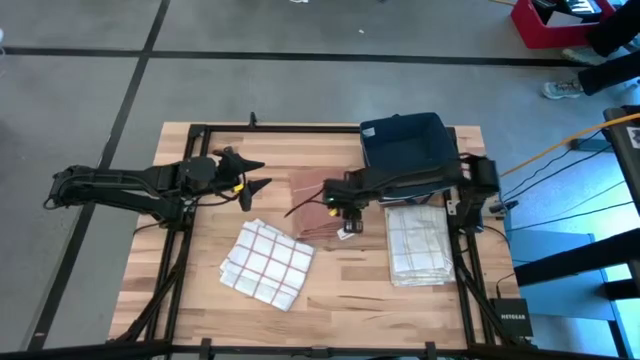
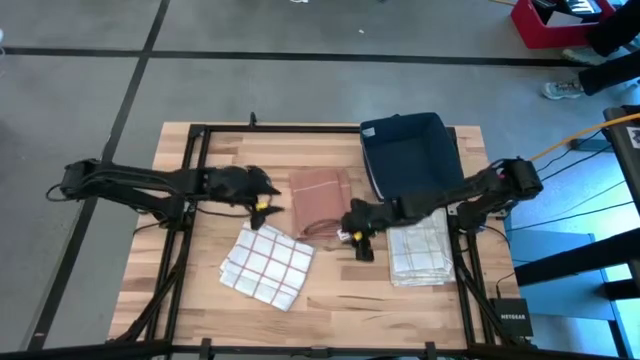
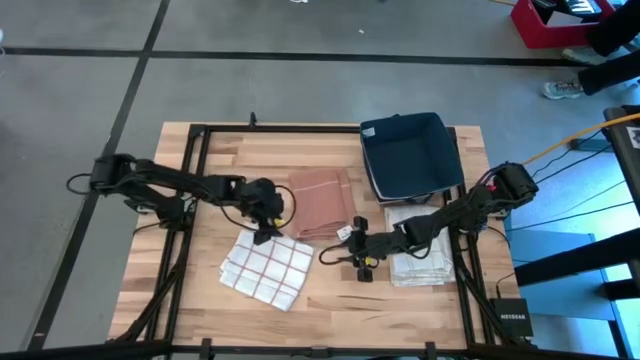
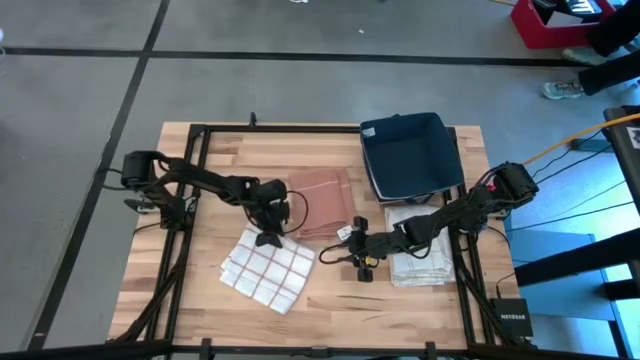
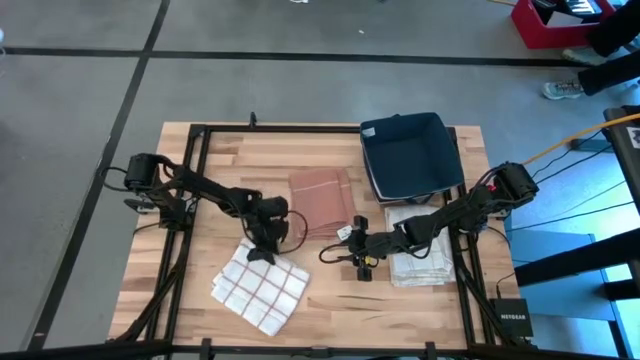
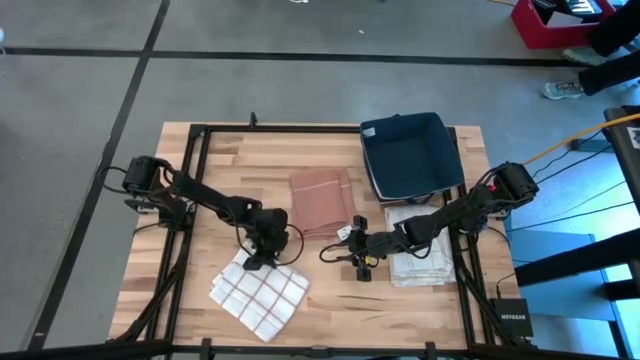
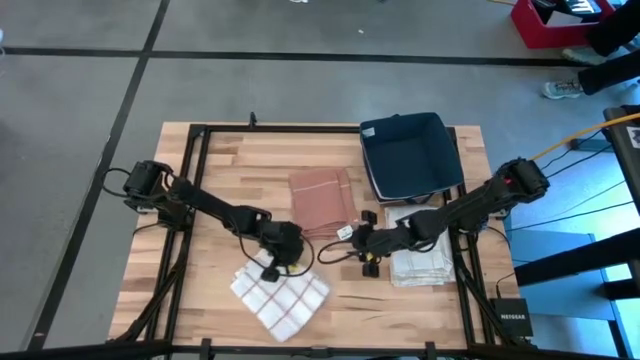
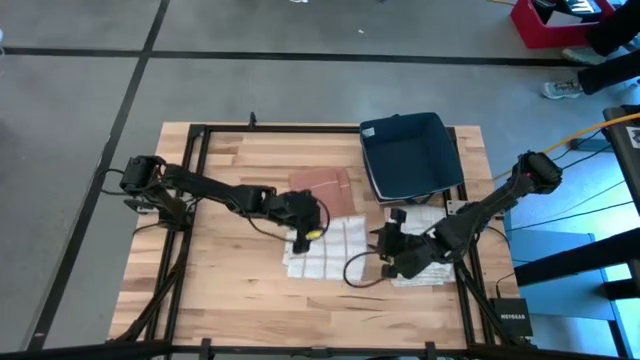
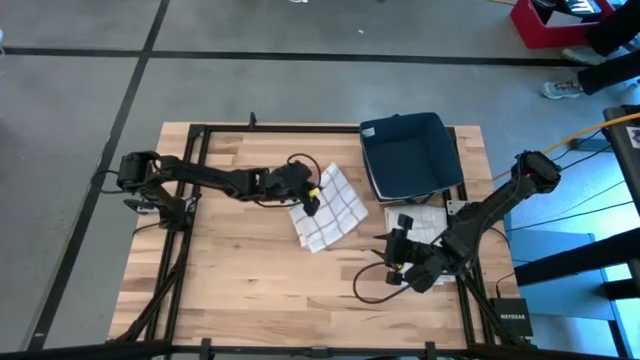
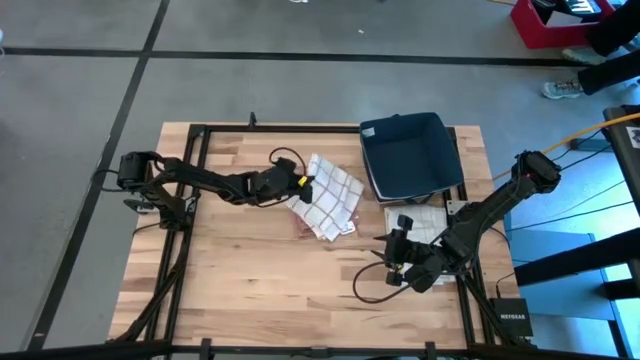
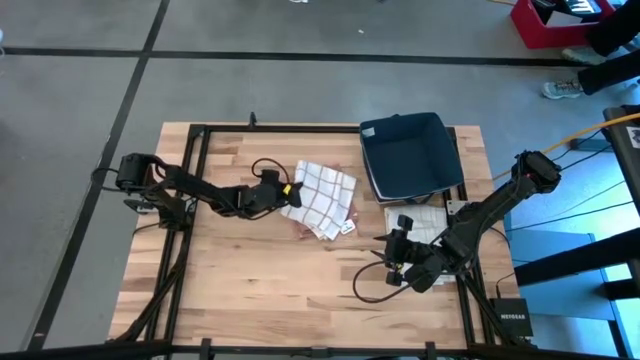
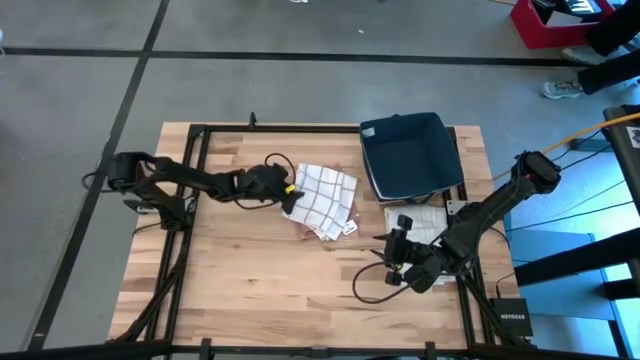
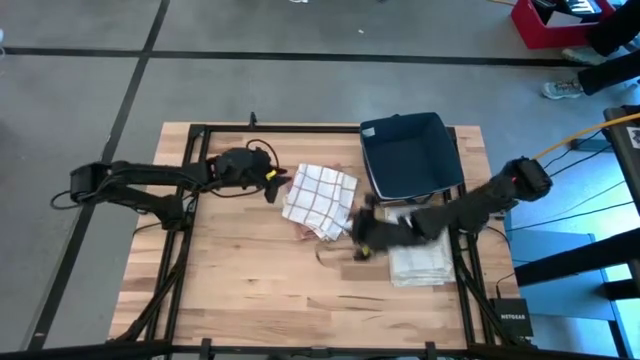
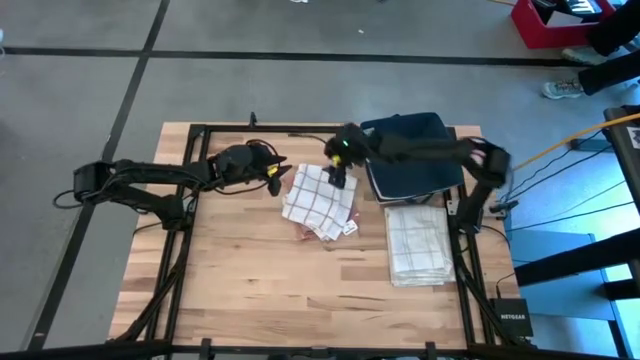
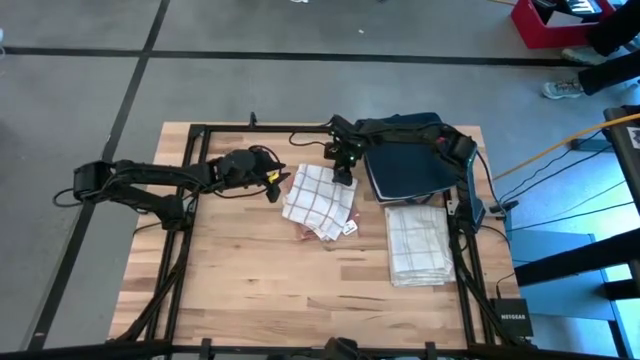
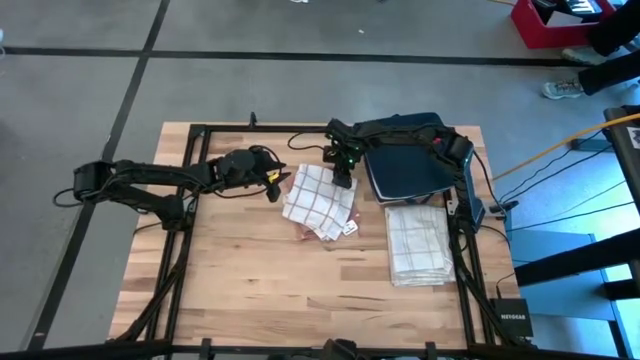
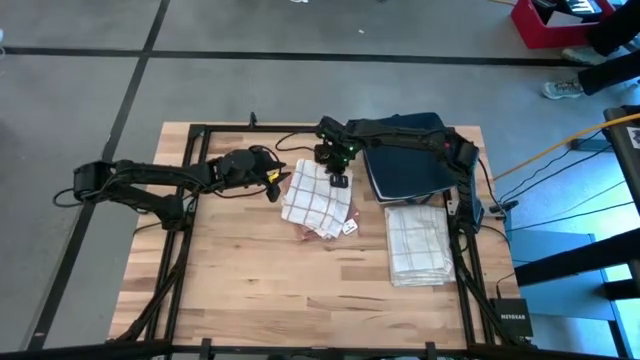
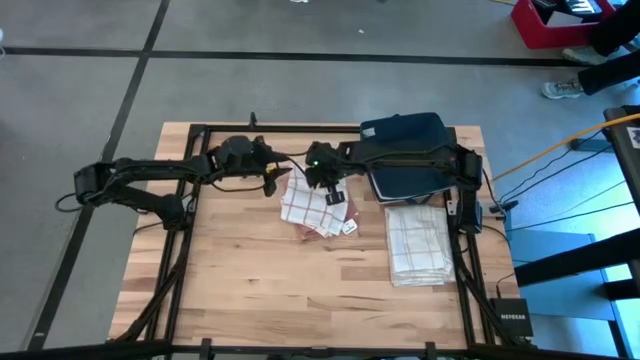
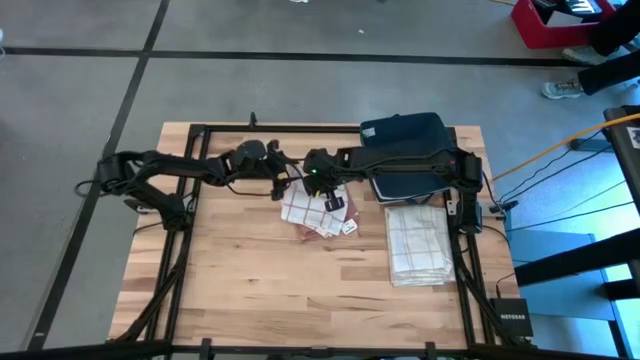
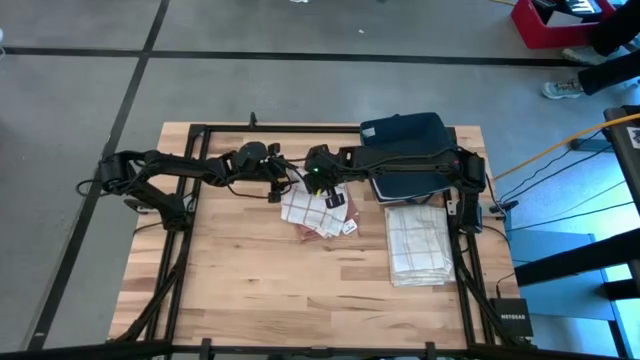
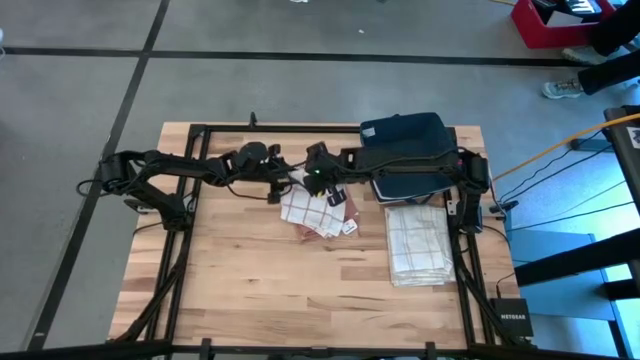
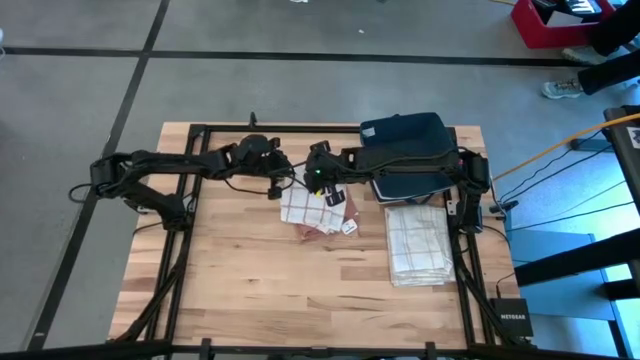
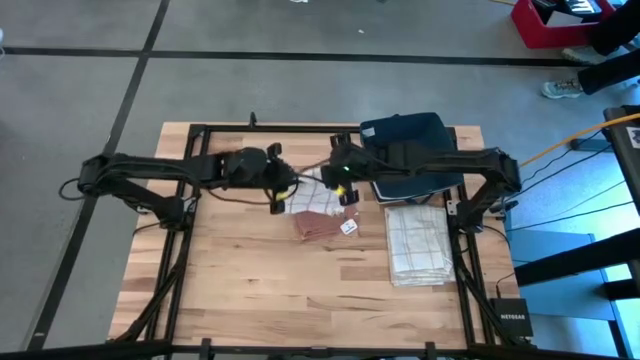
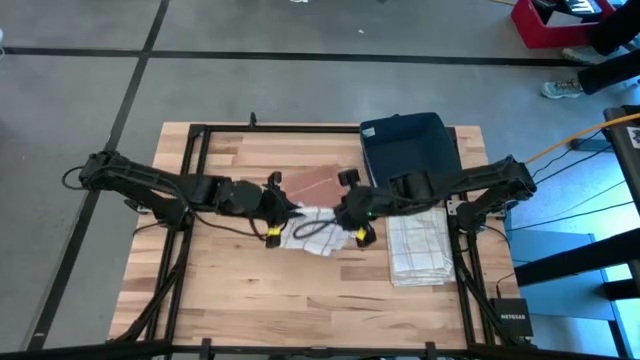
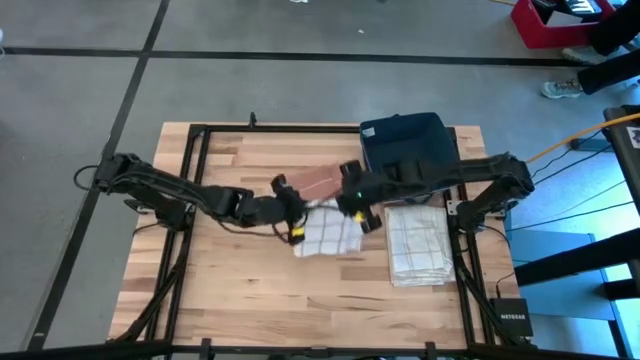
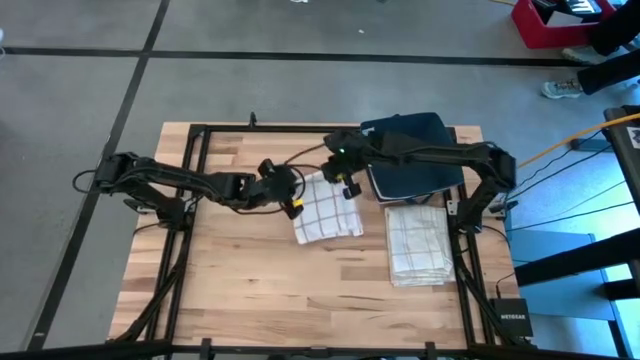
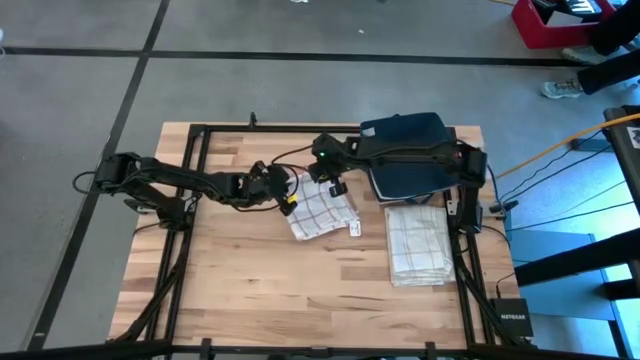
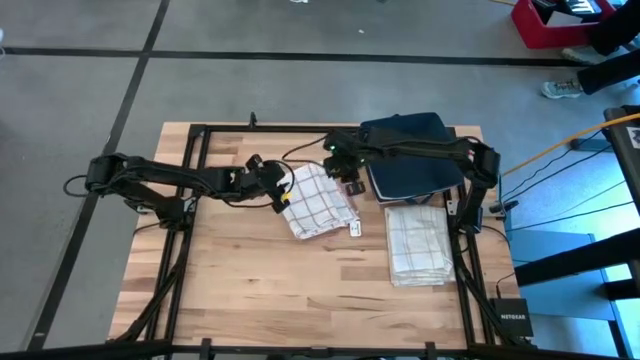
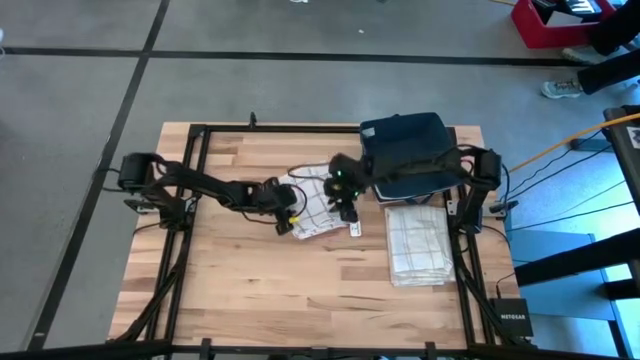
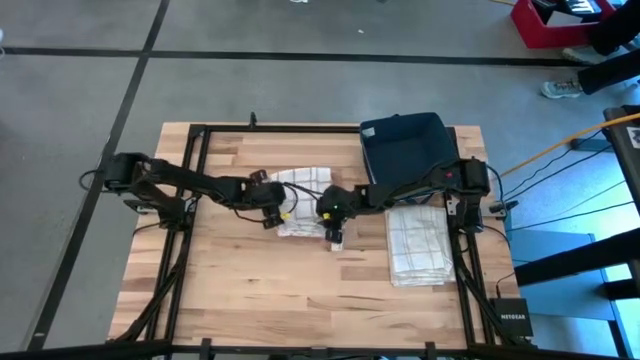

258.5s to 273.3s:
Task: Fold towel
Stack the left white towel on top of the brown towel

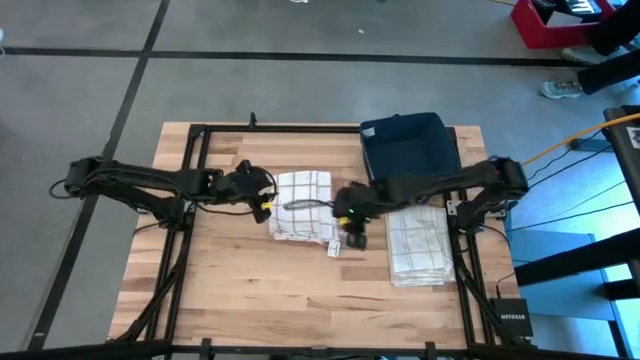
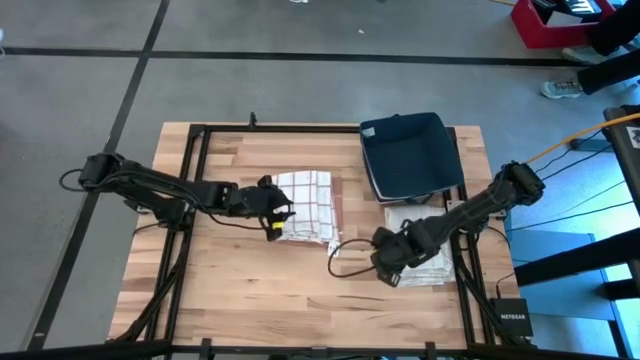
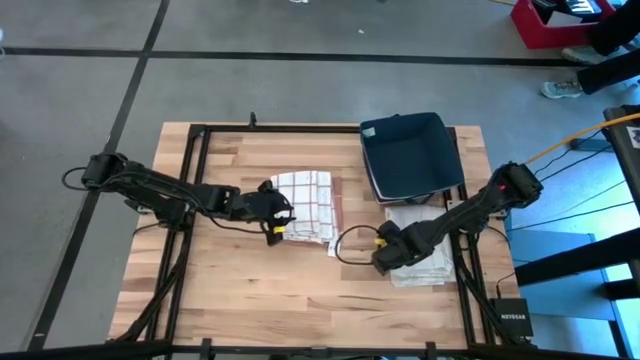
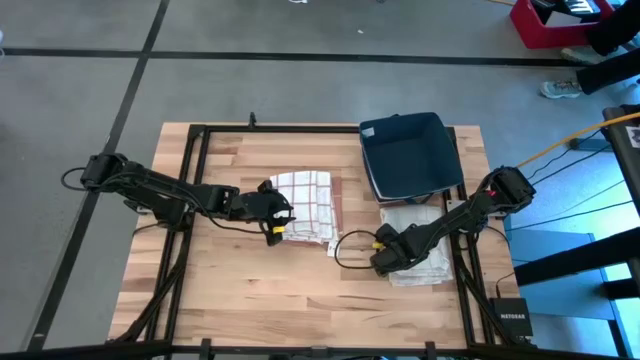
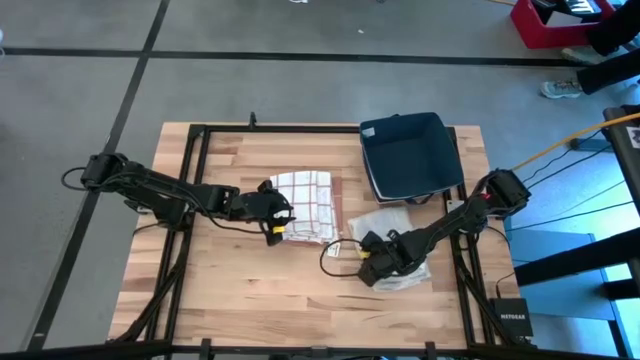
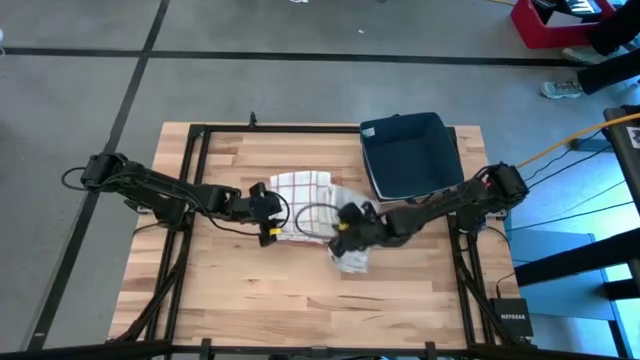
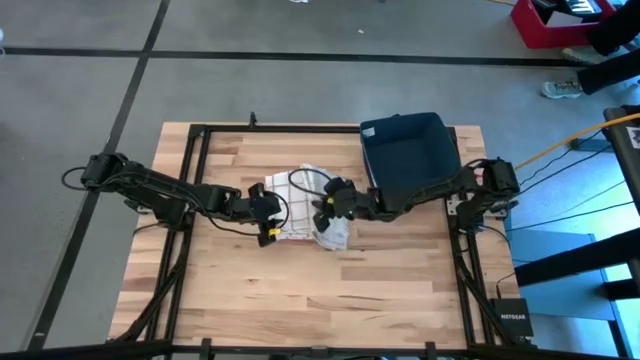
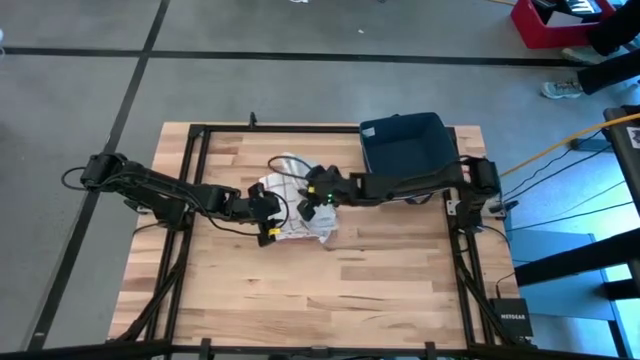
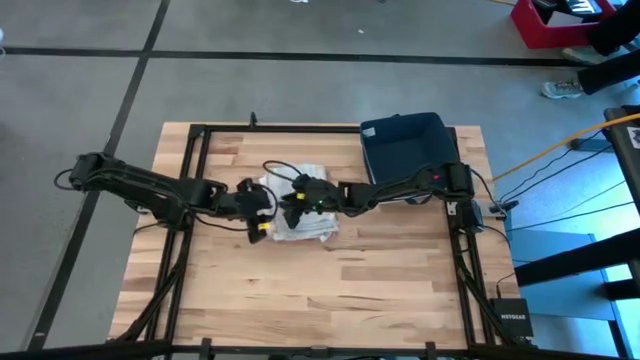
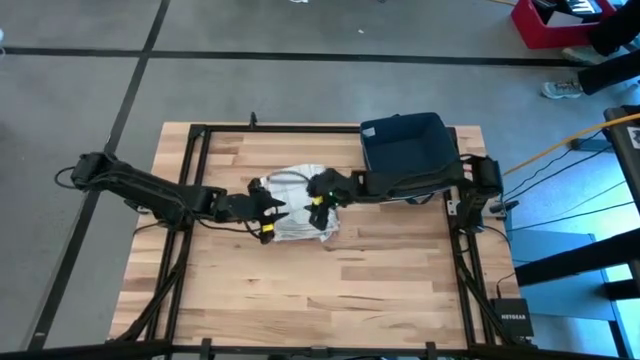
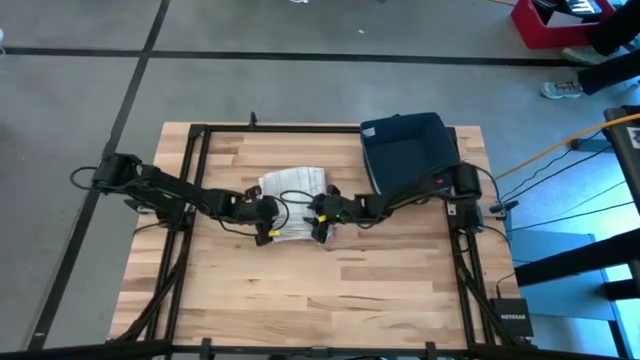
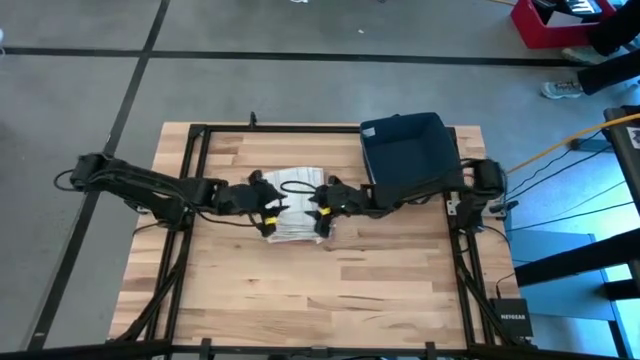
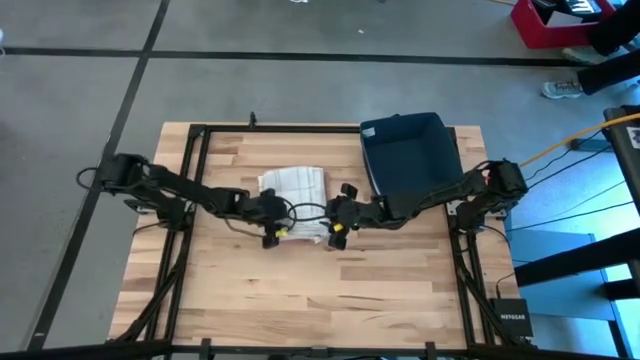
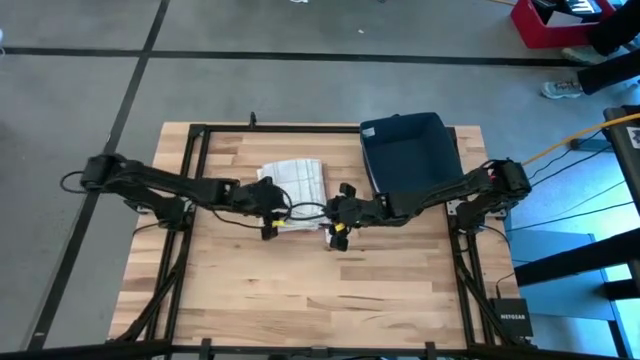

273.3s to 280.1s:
Stack the white towel on top of the other white towel
